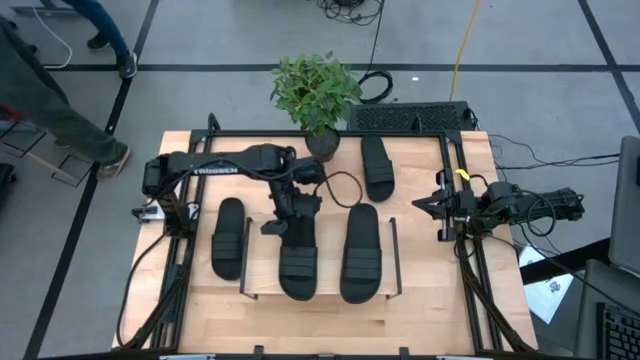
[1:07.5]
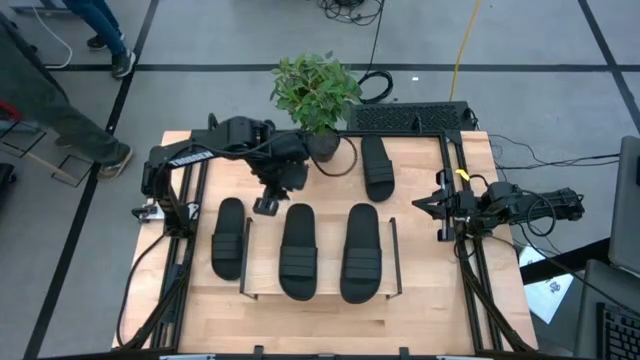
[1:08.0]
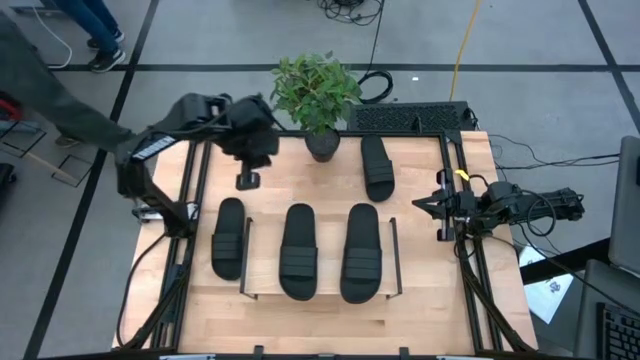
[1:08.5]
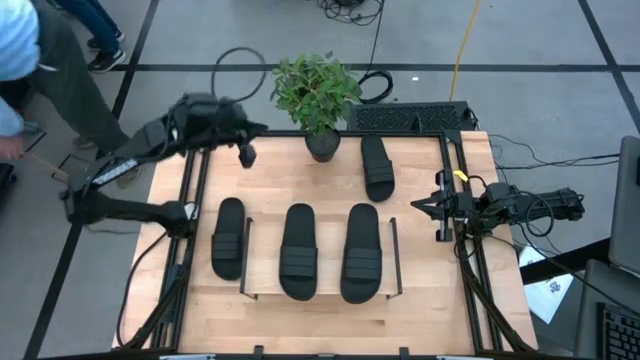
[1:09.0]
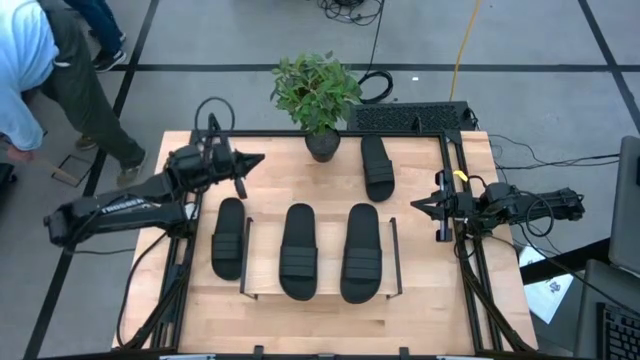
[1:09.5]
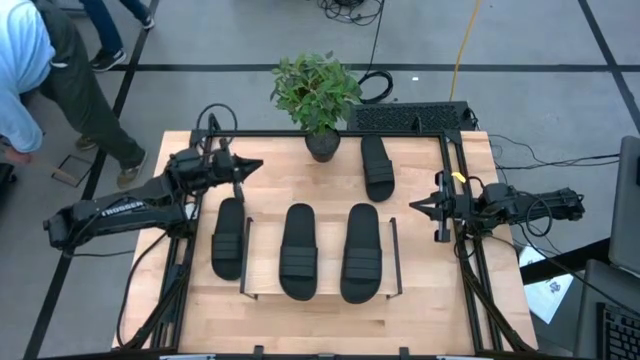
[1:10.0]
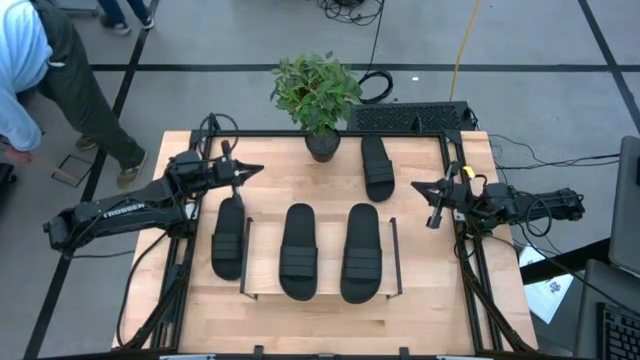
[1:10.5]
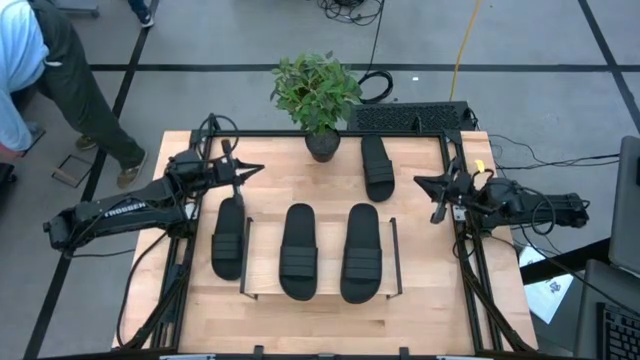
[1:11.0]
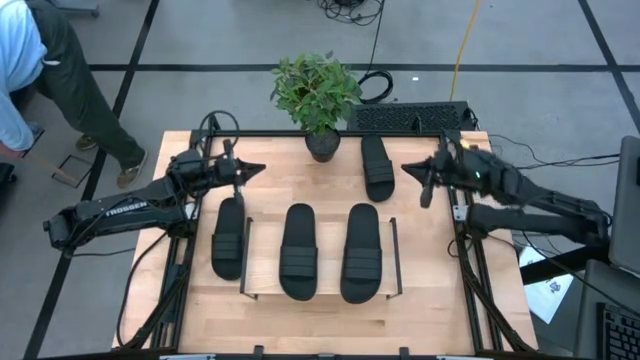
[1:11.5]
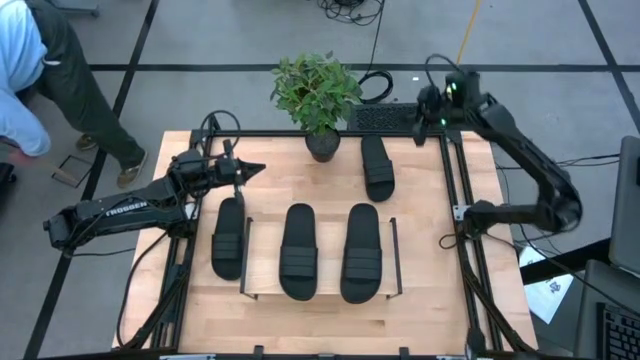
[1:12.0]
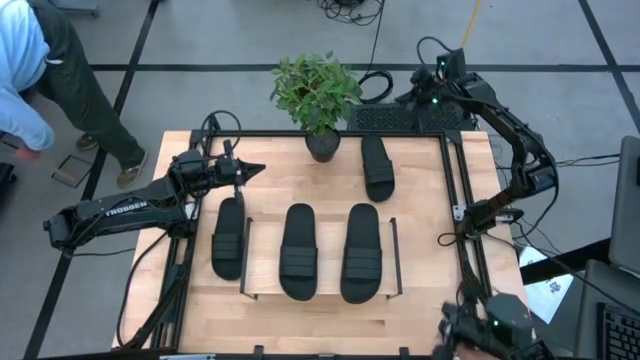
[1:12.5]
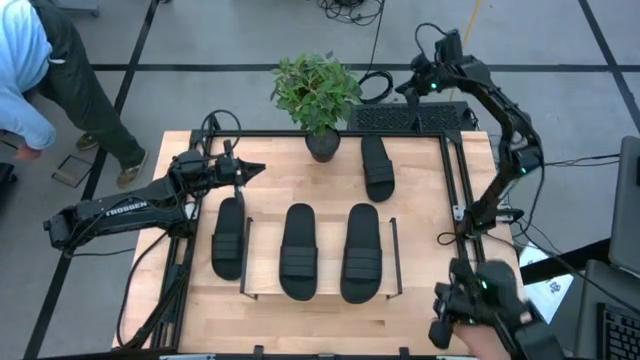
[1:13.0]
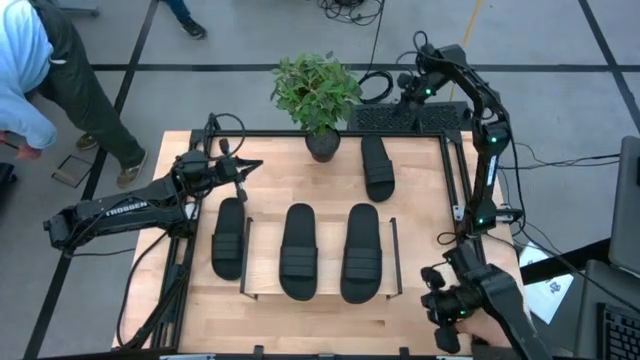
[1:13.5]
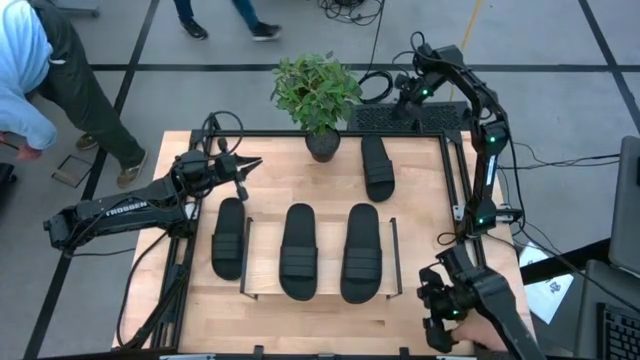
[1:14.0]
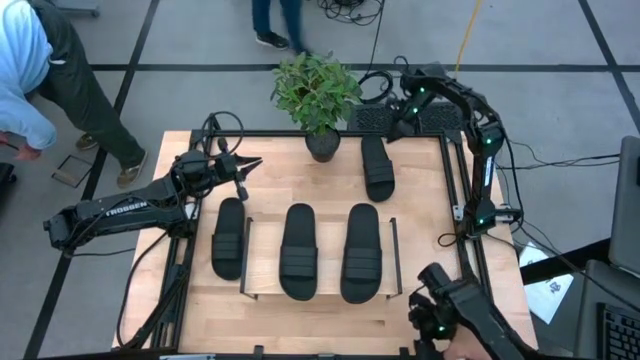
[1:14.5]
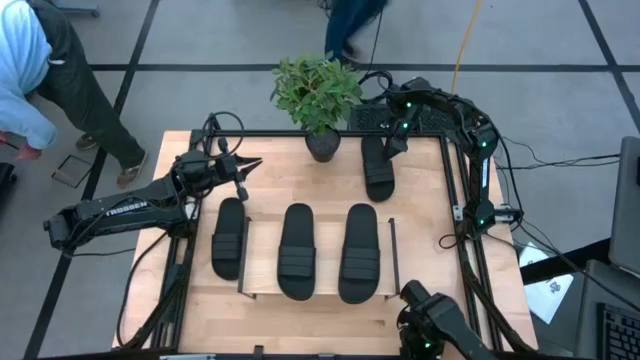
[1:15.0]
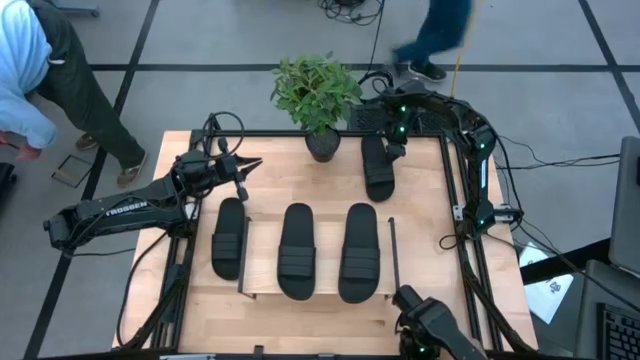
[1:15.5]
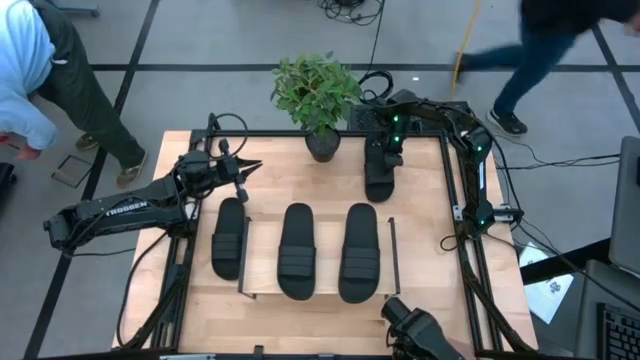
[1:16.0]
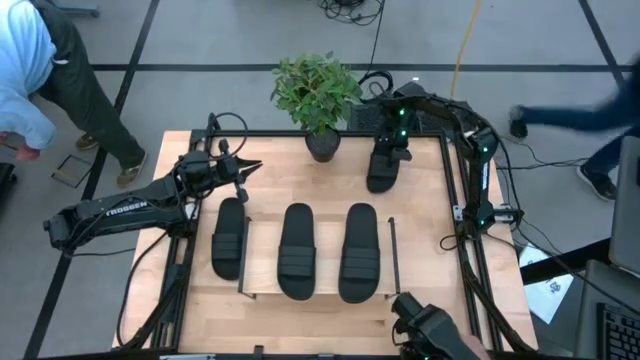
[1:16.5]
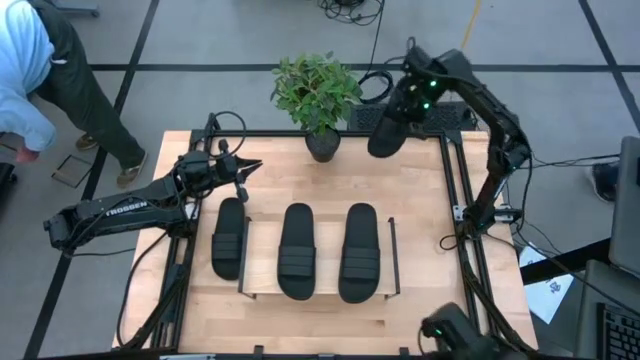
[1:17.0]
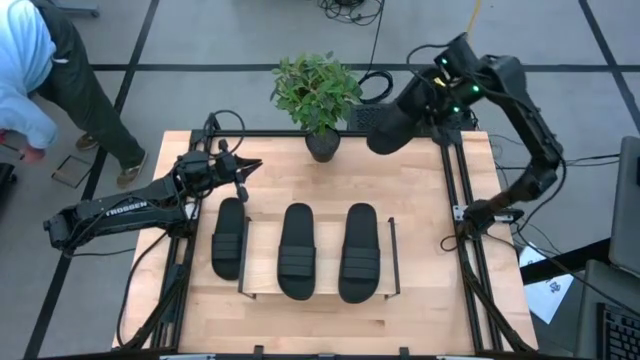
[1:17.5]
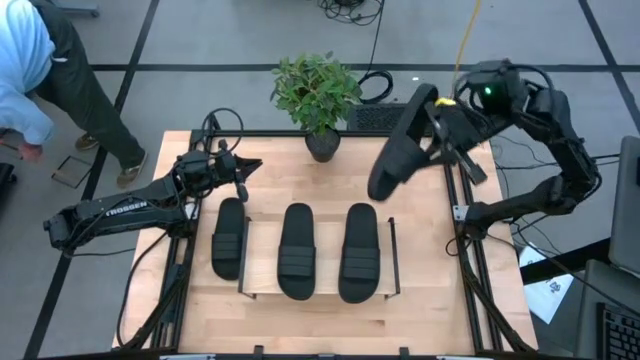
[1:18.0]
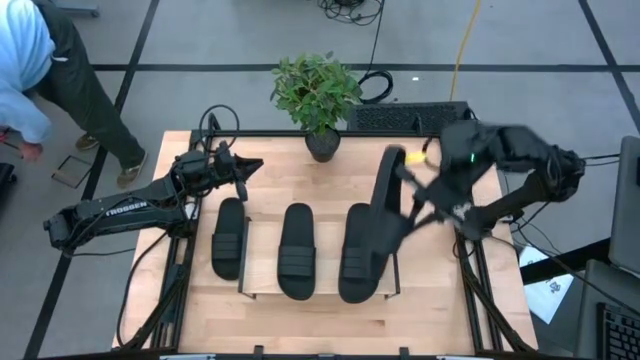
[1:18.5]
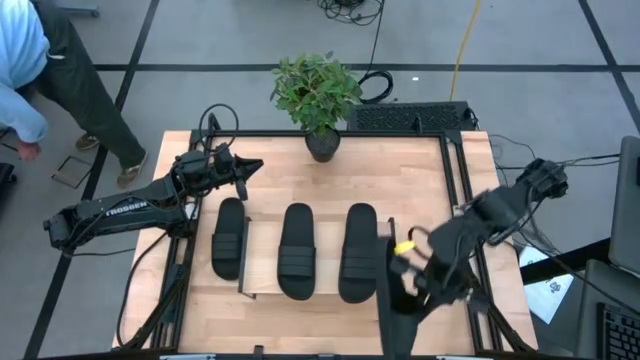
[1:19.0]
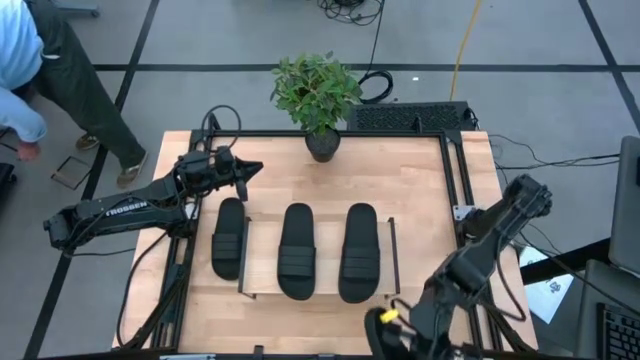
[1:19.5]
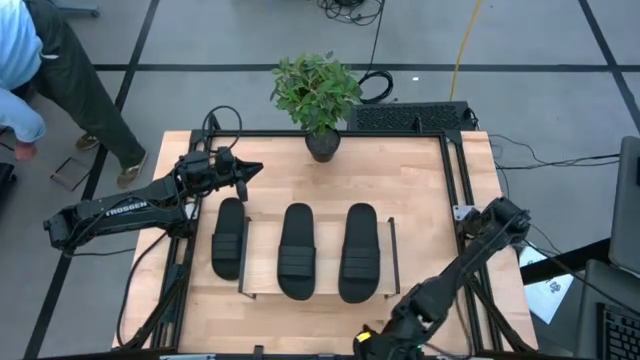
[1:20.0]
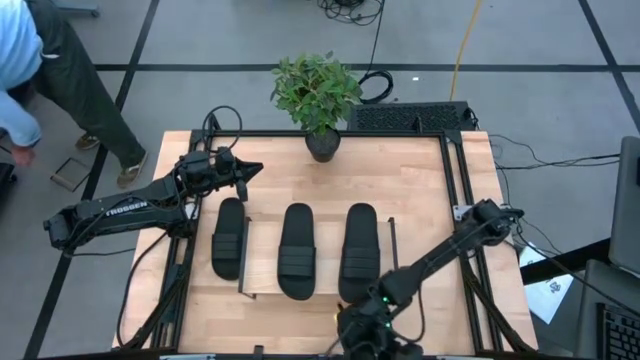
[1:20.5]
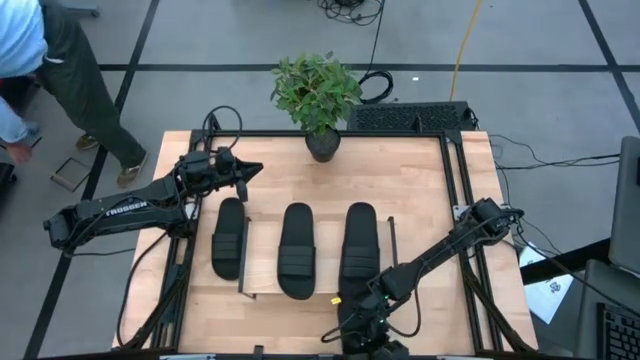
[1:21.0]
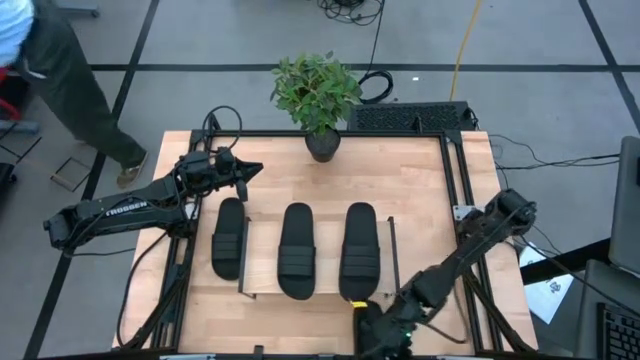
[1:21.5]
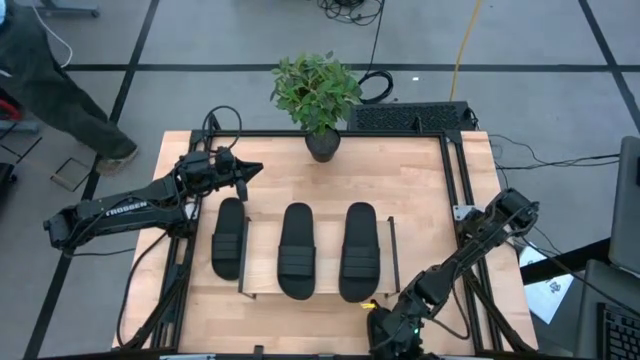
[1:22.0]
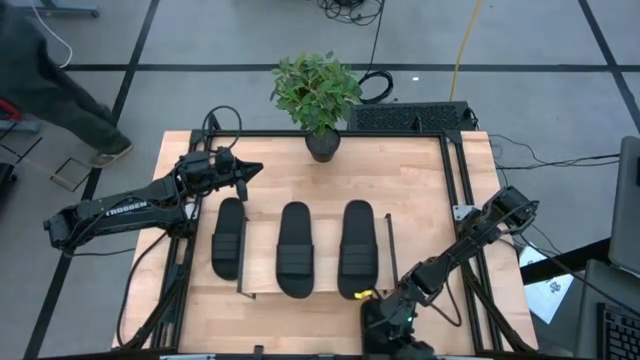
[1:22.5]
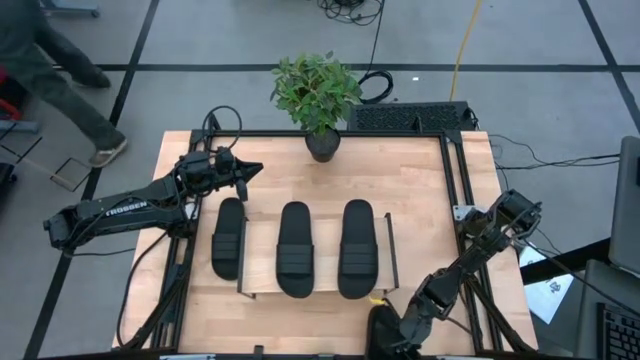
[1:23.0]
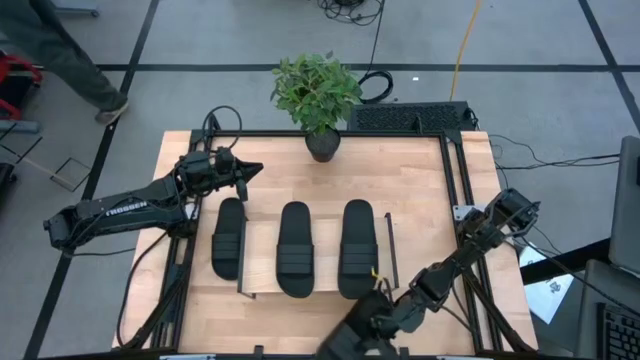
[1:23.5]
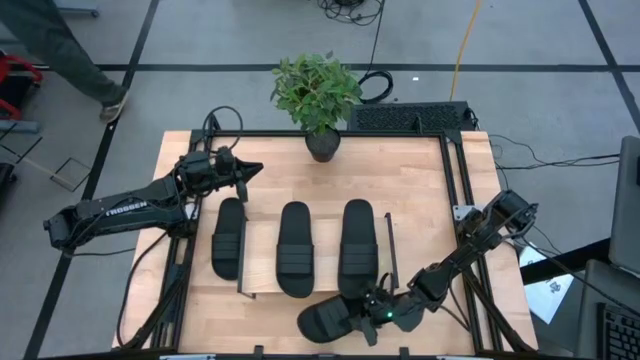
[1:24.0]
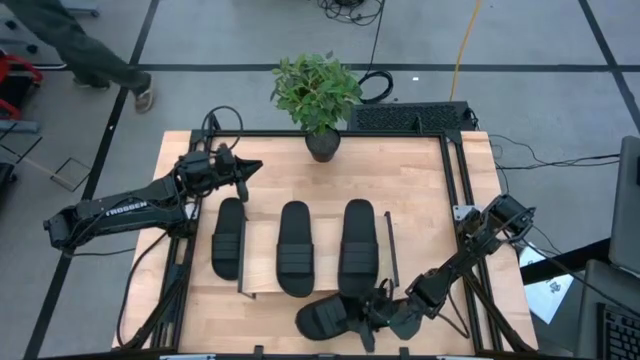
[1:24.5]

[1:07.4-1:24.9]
Task: Pick and place slides into the shelf
Put the black slipper under the shelf

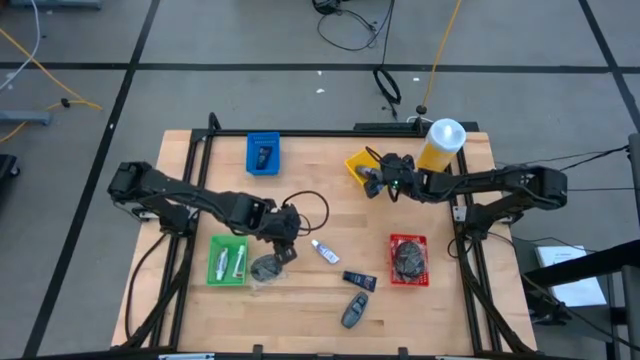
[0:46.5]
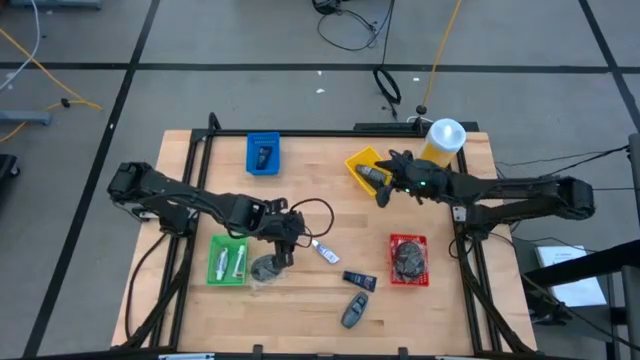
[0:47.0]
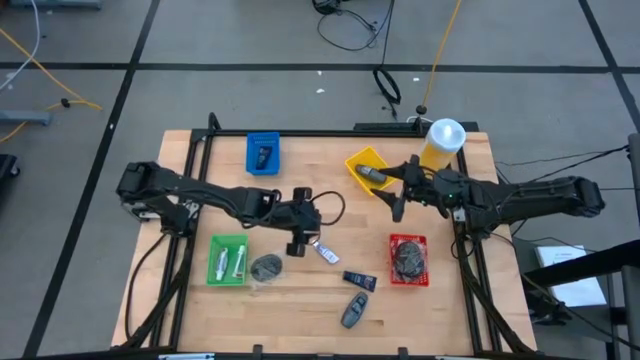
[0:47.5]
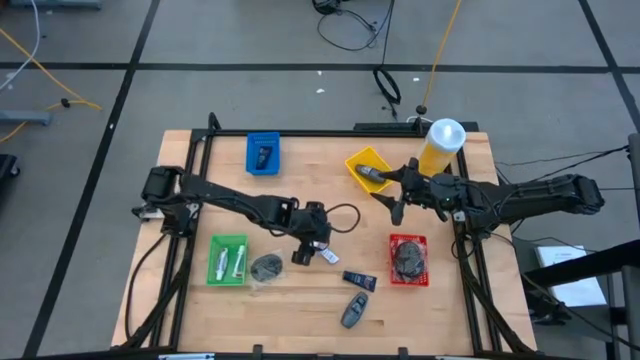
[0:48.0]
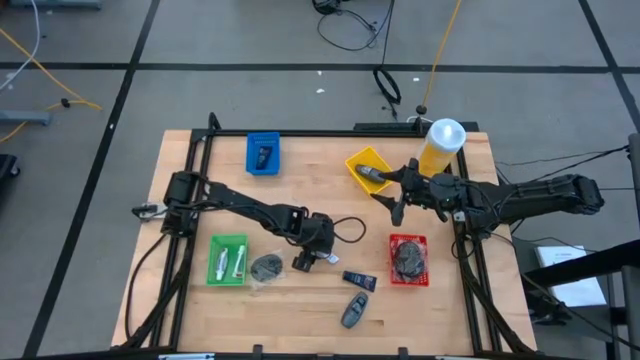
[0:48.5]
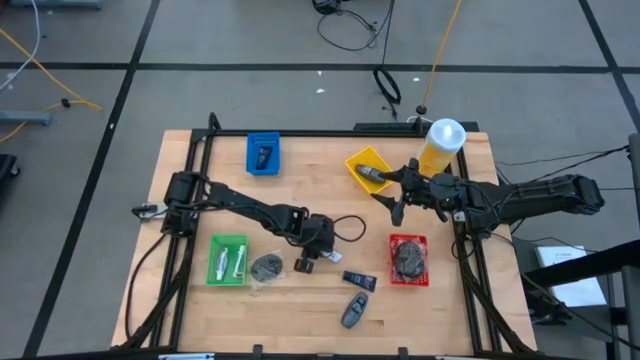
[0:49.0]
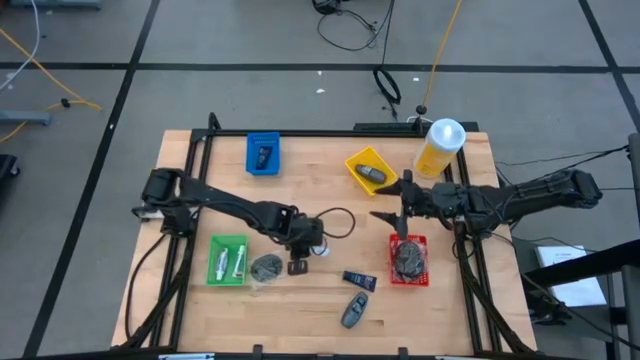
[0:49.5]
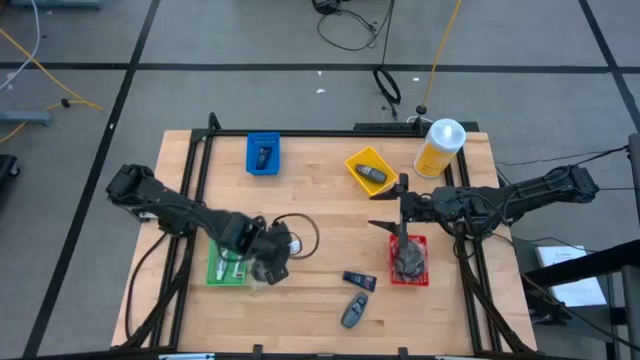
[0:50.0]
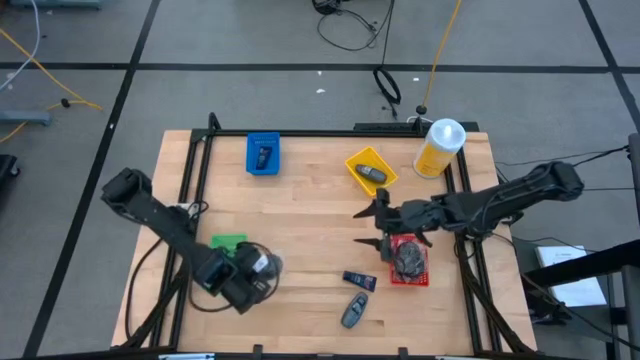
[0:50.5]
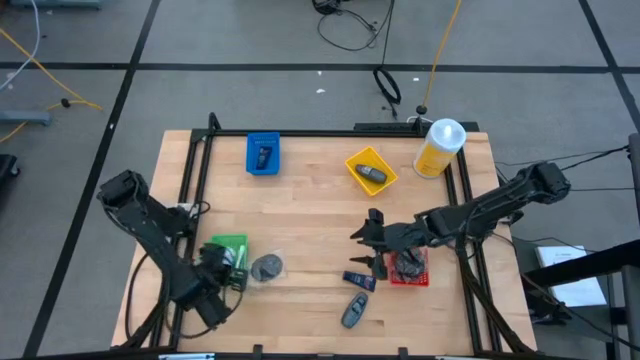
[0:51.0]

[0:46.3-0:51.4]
Task: Pick & Place Travel size toiletries
Put the white toothpaste into the green bin
